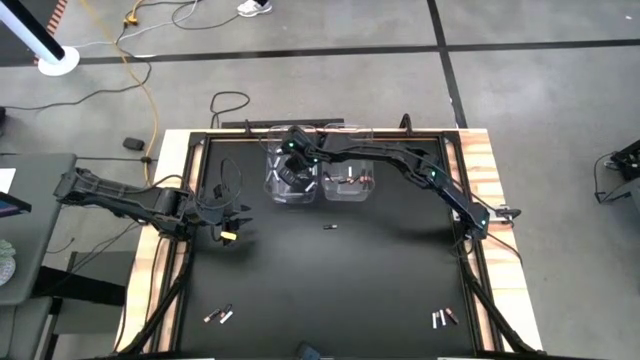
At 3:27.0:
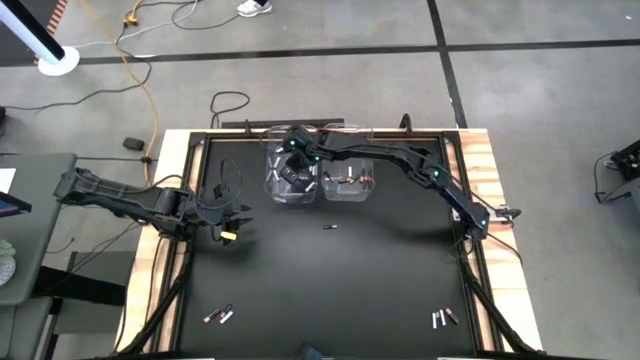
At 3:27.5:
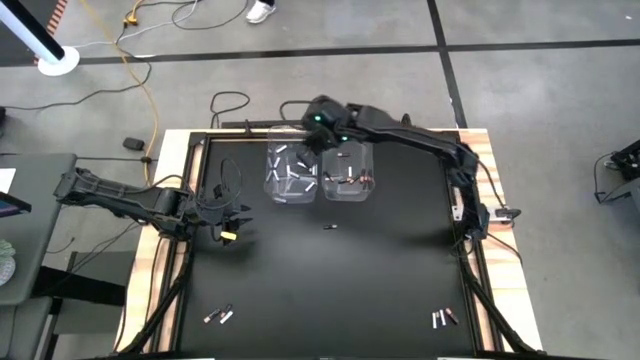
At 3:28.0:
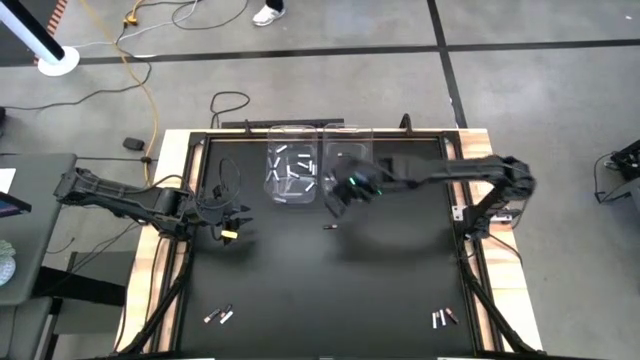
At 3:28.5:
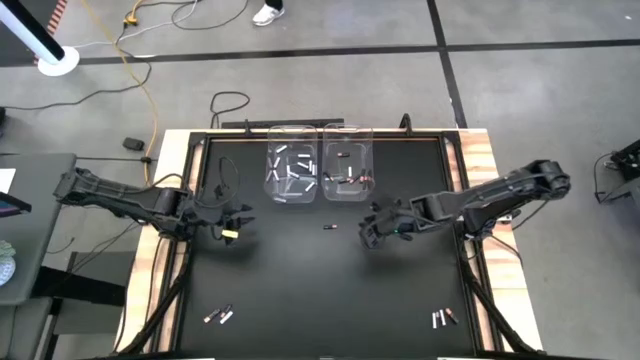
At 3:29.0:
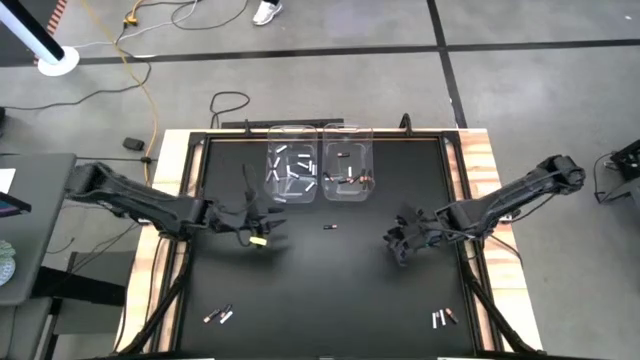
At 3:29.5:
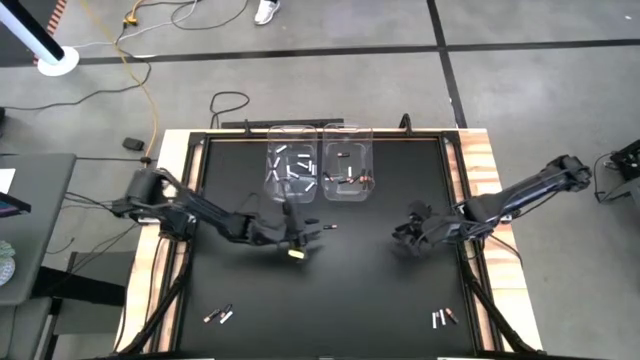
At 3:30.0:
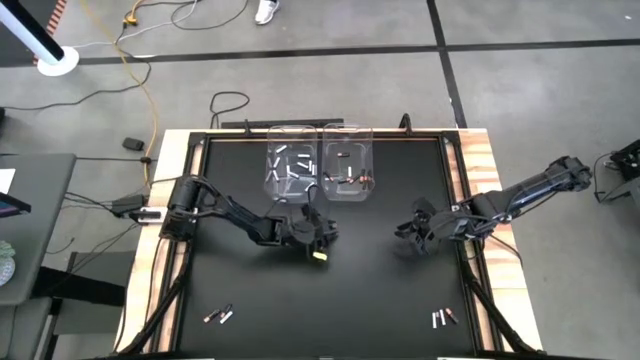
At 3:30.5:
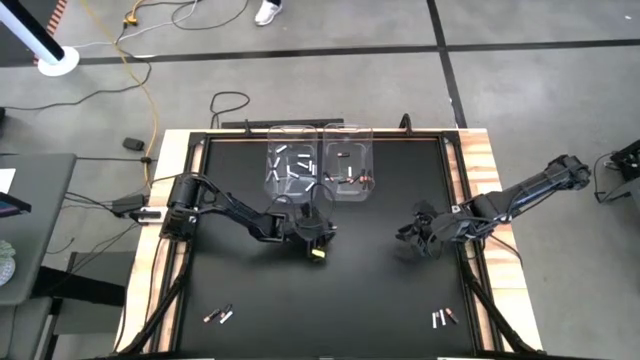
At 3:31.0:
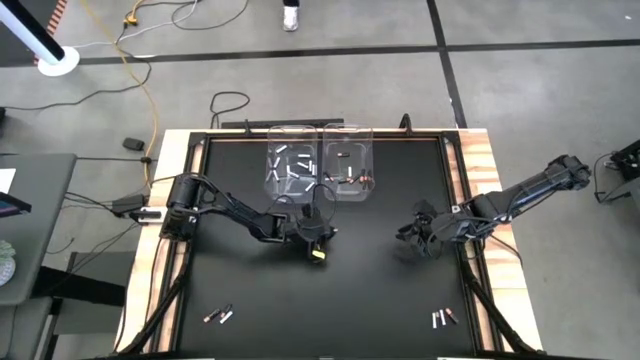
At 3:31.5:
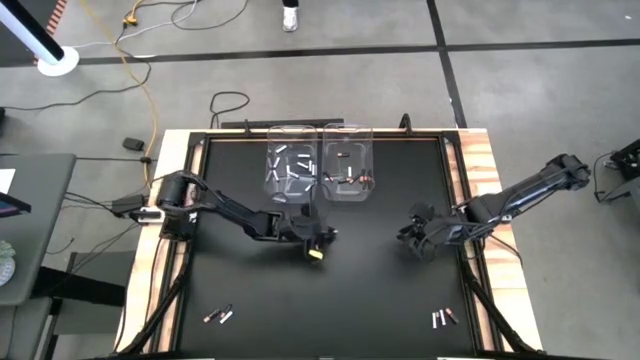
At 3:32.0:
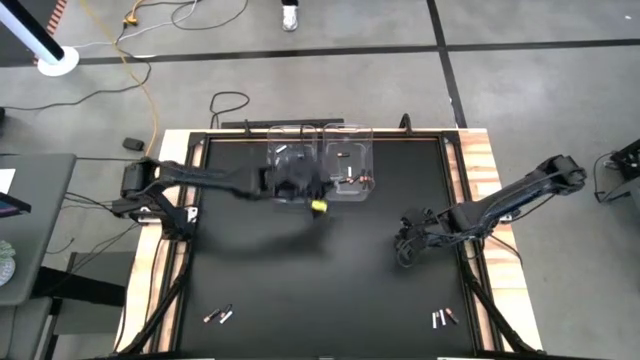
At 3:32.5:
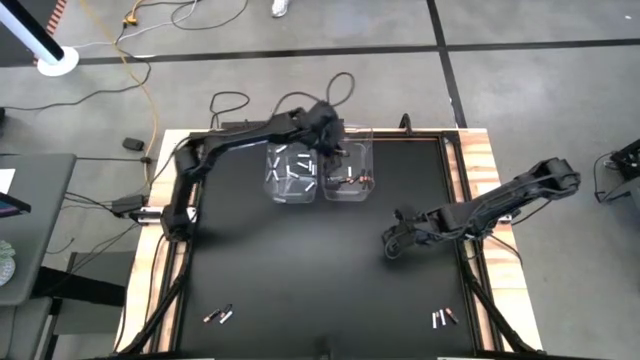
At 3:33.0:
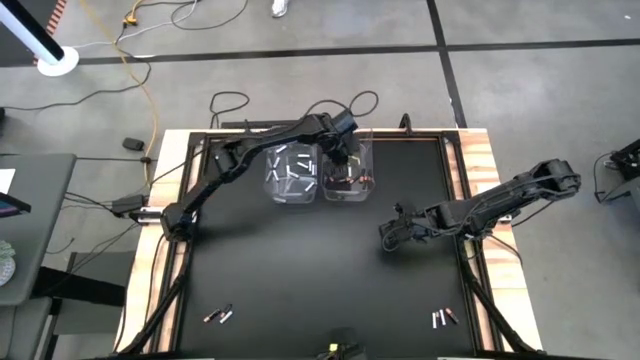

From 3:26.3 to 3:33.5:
Task: Sort batteries
Put the black battery into the right transparent bin

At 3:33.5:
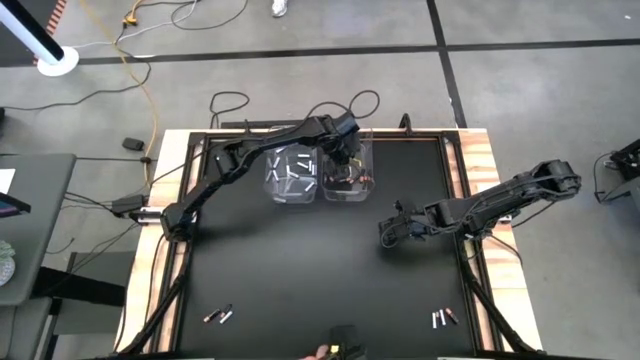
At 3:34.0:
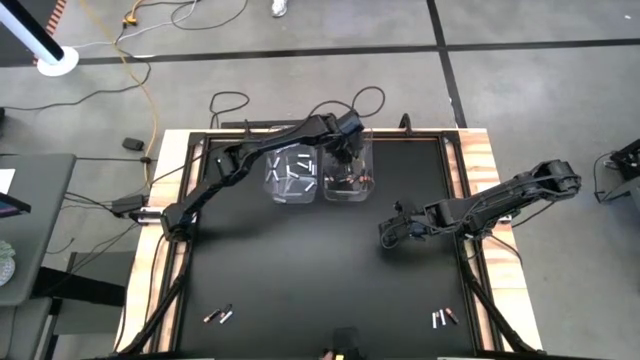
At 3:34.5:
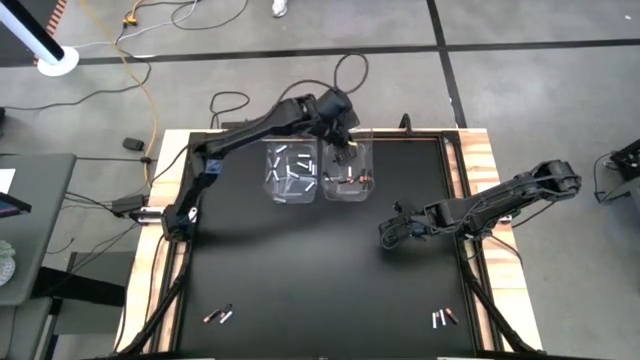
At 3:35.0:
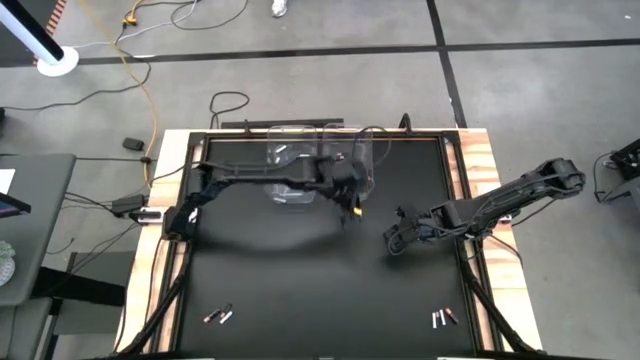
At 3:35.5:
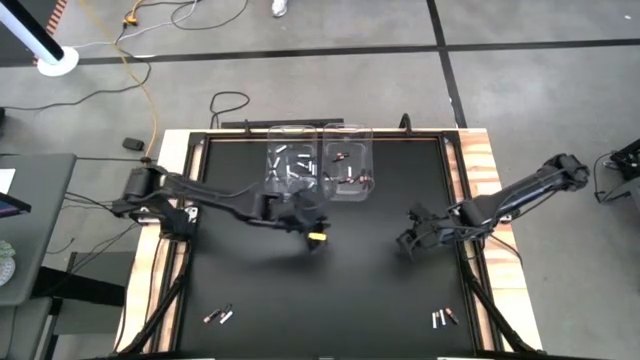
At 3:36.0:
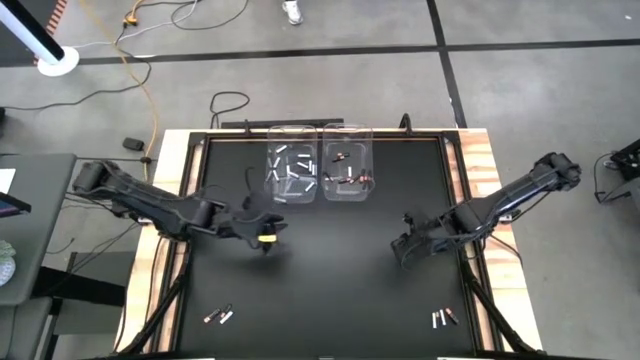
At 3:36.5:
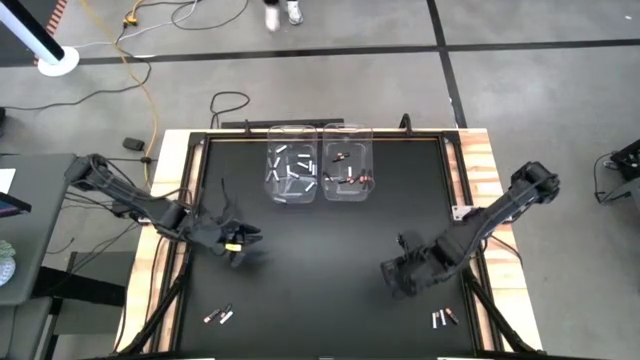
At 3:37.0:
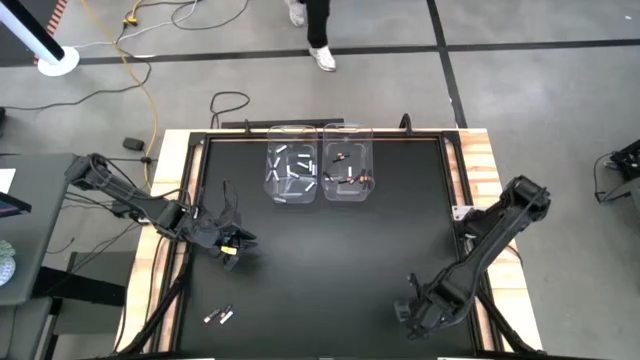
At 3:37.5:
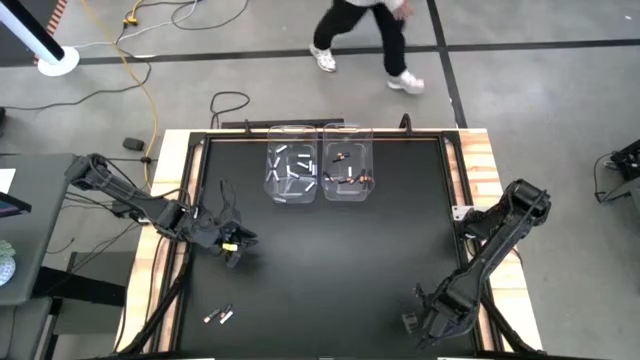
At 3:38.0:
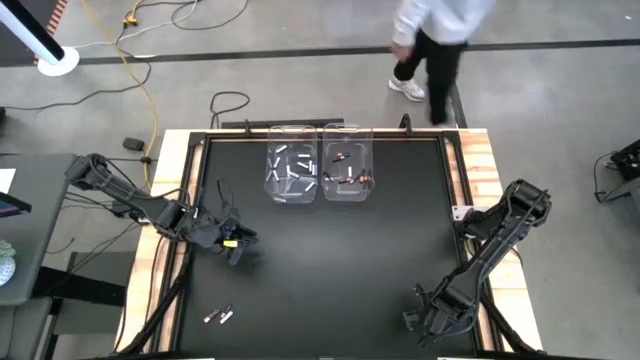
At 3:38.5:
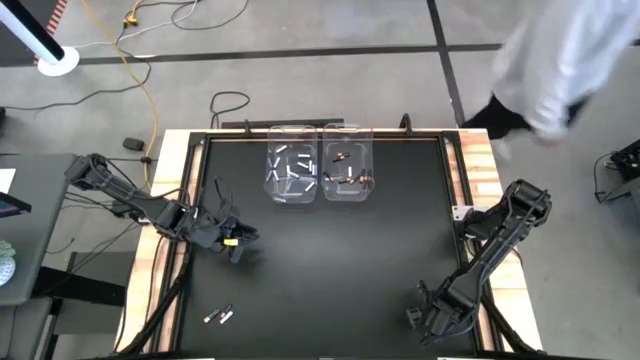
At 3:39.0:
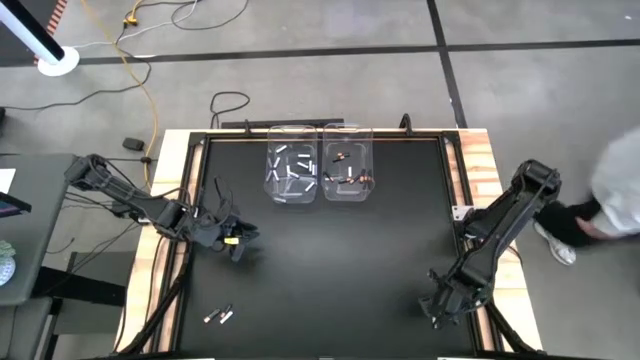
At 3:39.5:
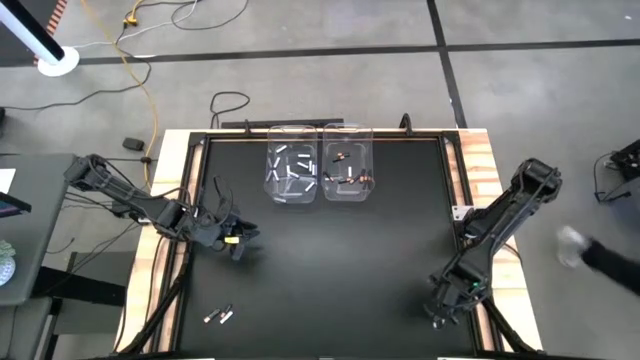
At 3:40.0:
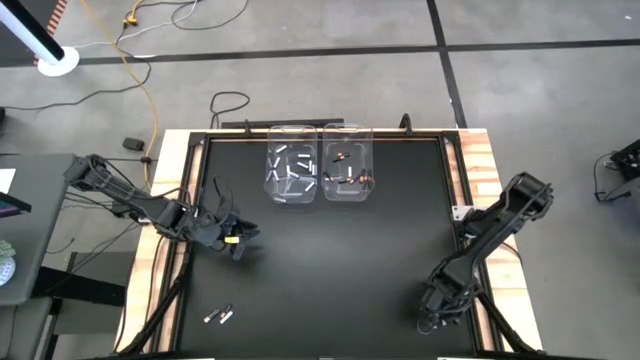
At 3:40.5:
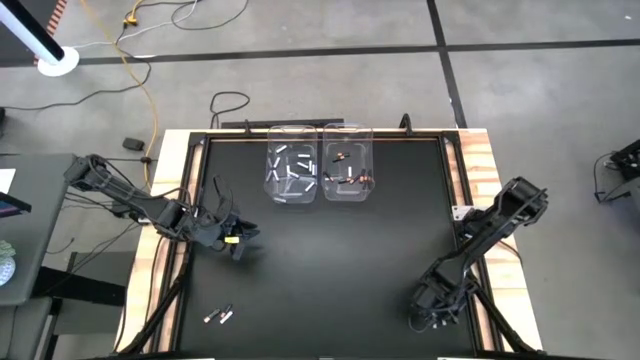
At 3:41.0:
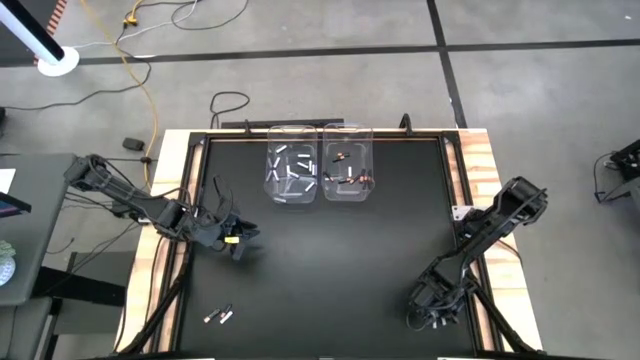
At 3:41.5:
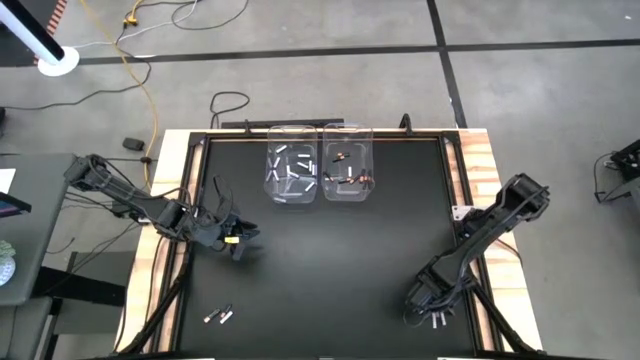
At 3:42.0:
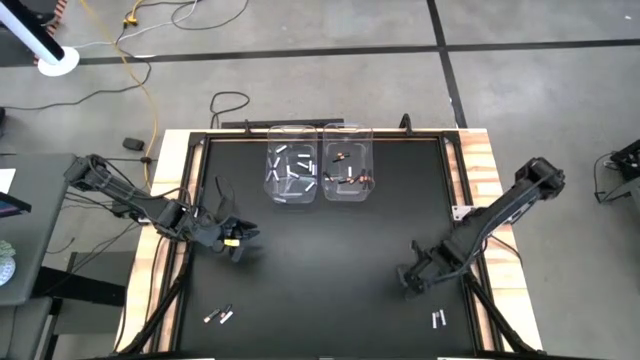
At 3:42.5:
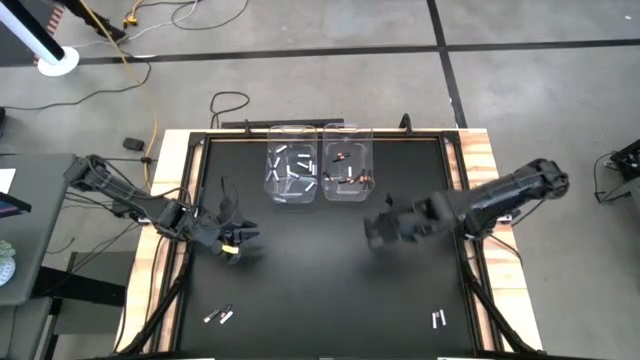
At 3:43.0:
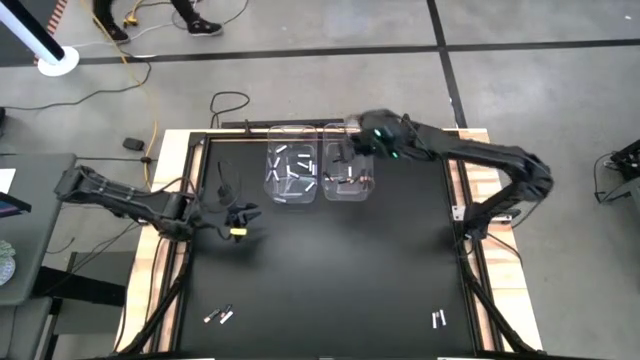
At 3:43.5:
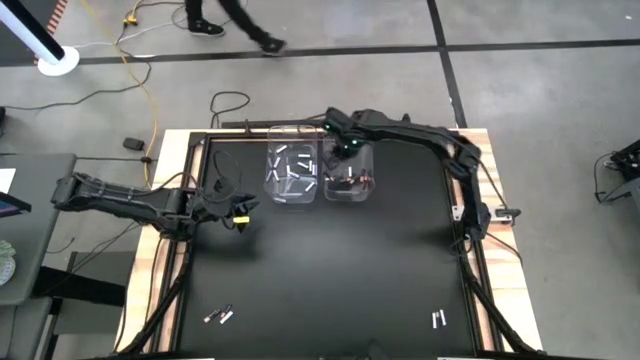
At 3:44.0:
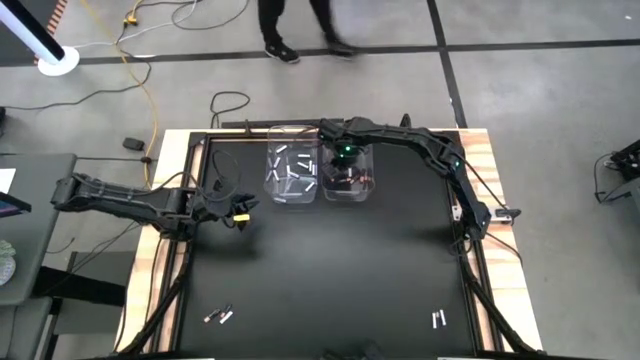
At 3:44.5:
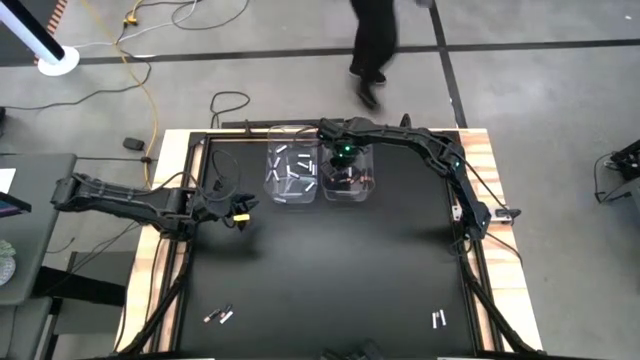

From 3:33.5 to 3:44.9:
Put the black battery into the right transparent bin
